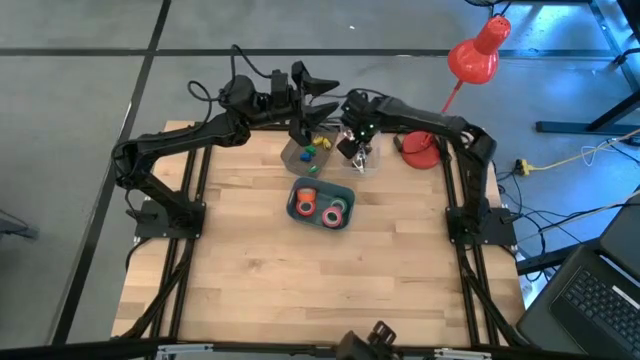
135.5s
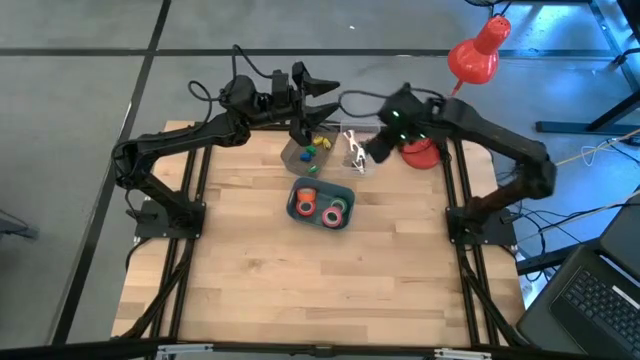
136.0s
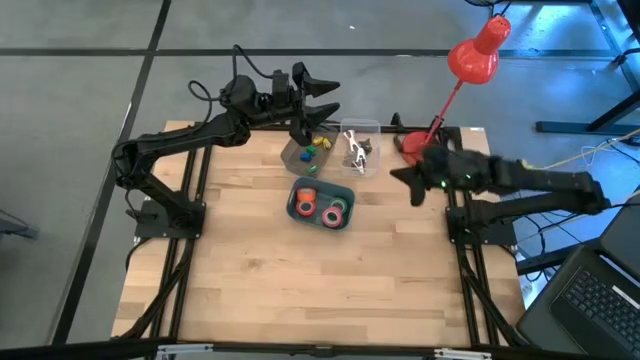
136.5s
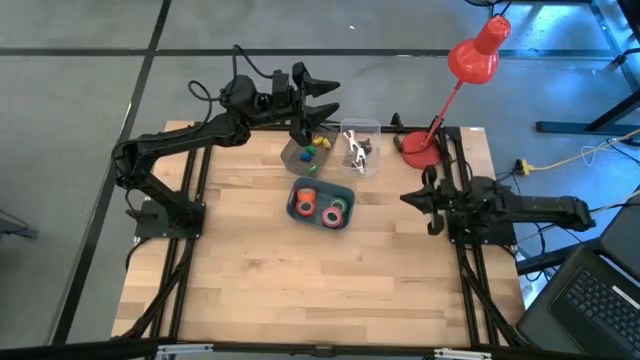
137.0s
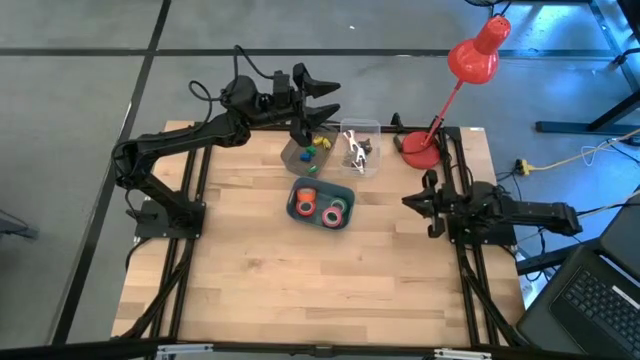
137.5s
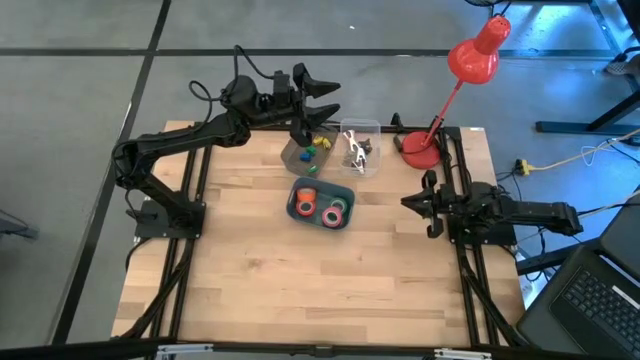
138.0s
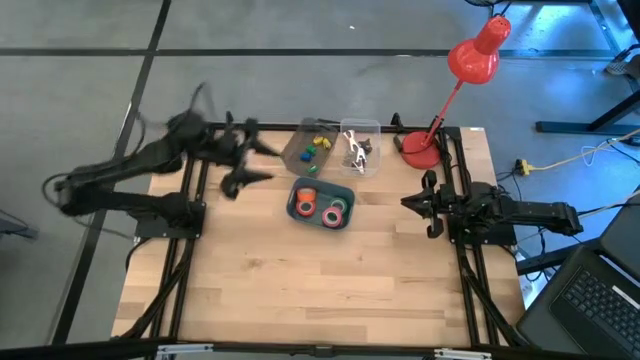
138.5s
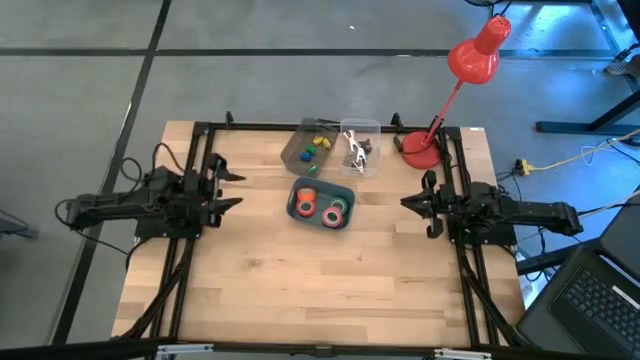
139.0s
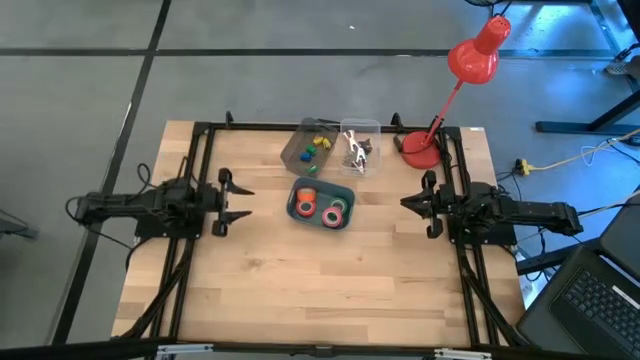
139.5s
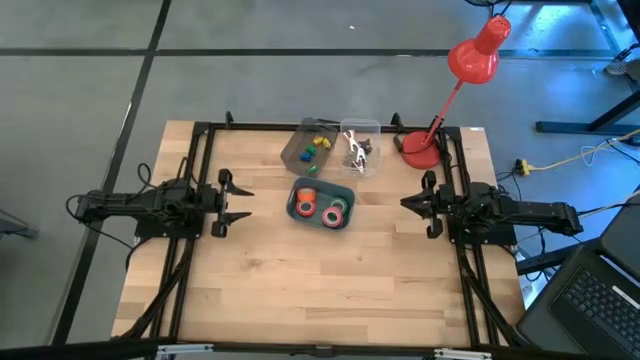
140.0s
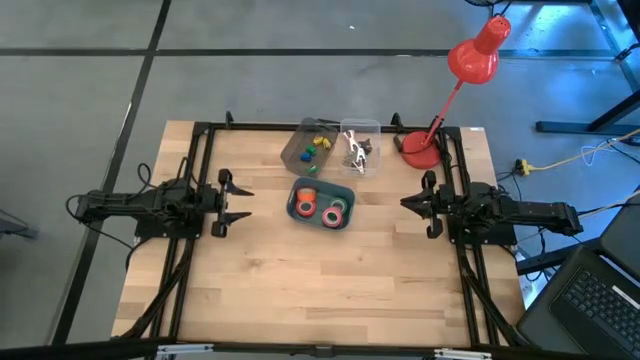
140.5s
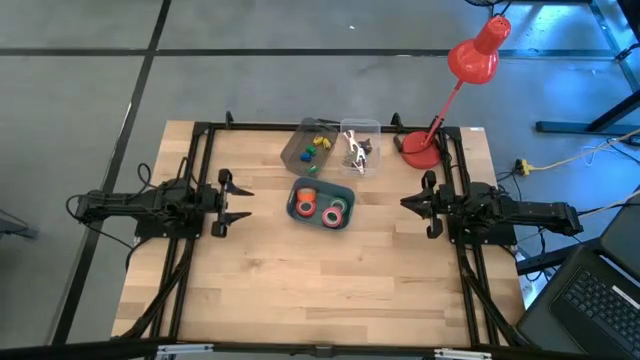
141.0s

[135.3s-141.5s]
Task: Pick and place Stapler, Stapler remover, tape
Return to Home Position

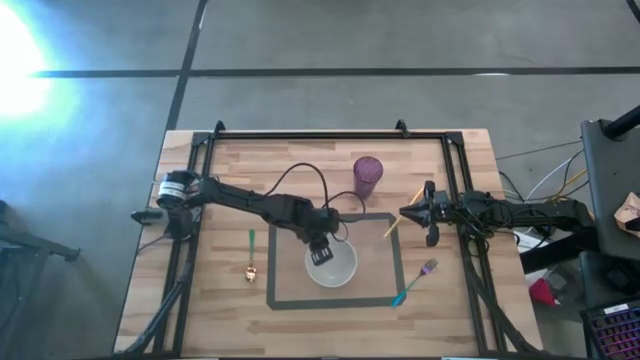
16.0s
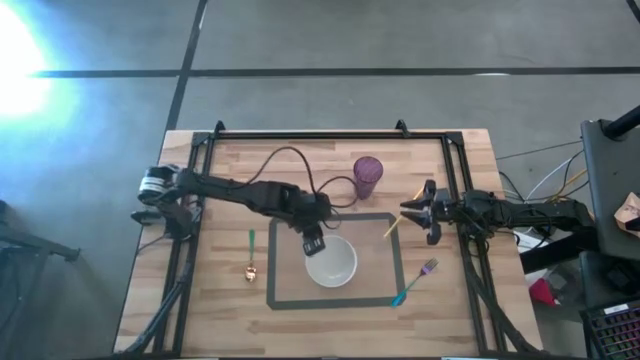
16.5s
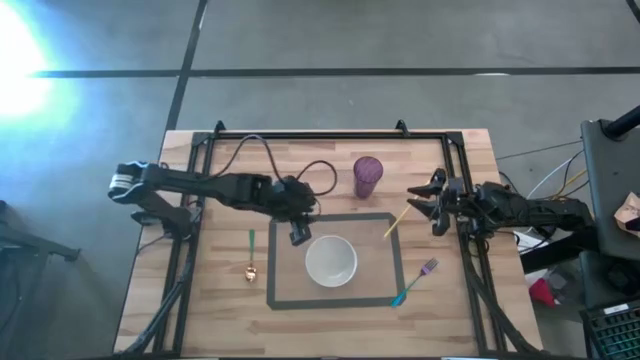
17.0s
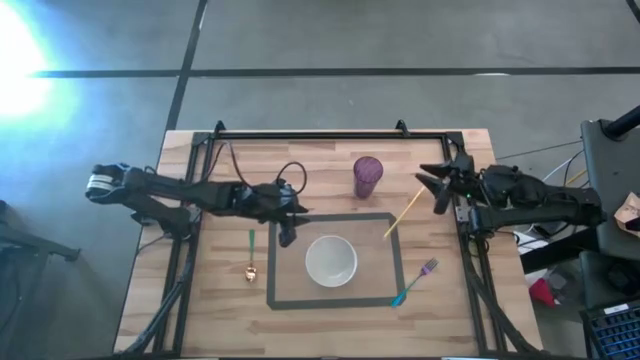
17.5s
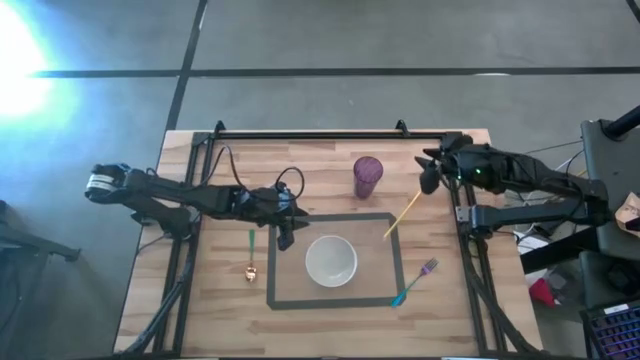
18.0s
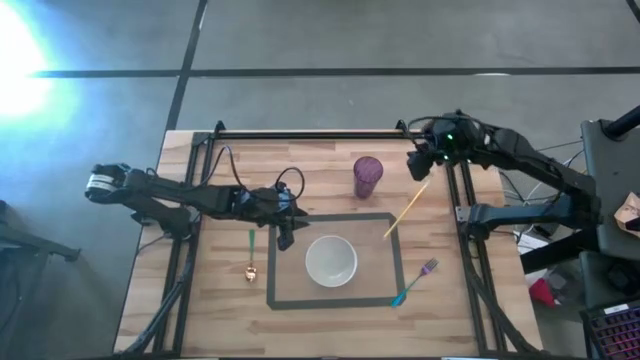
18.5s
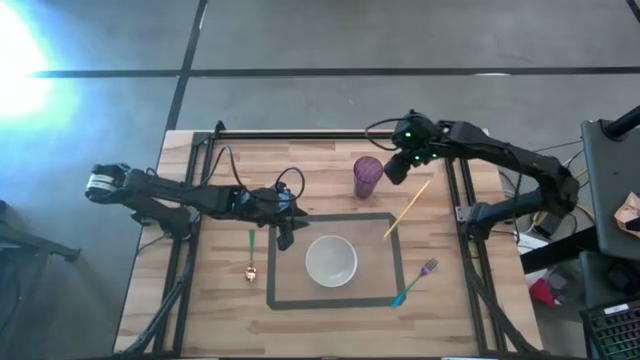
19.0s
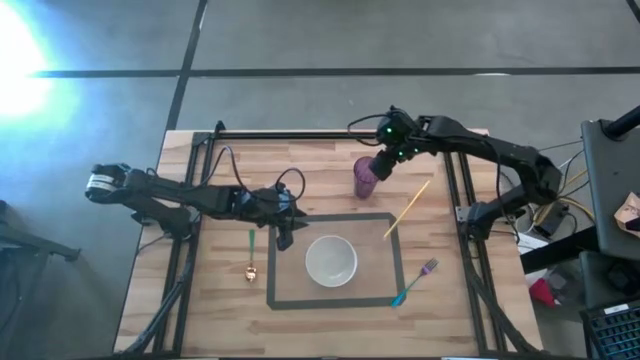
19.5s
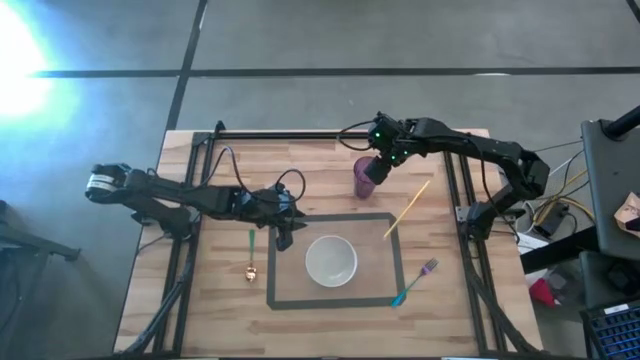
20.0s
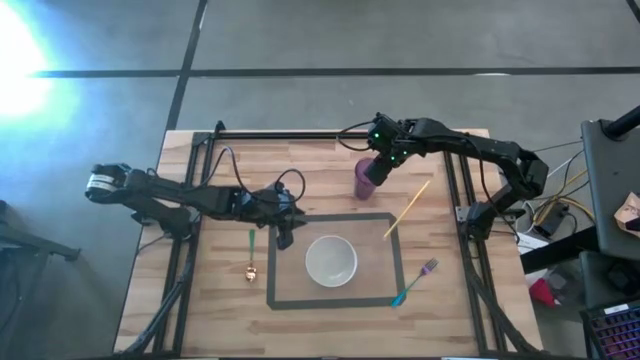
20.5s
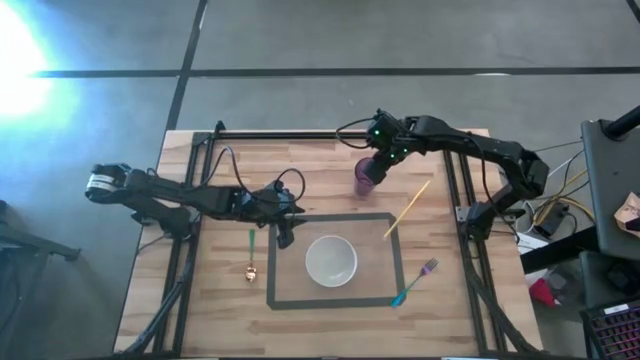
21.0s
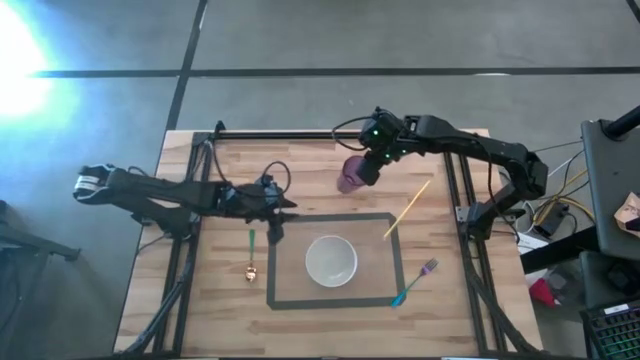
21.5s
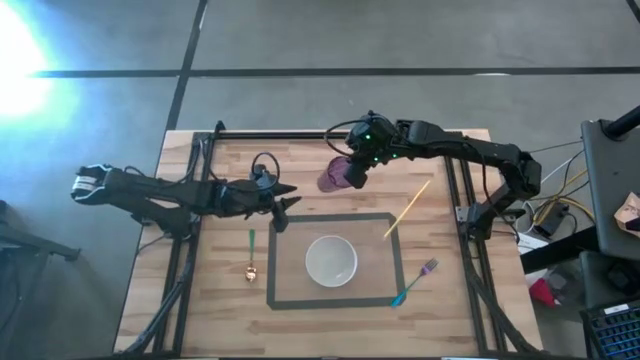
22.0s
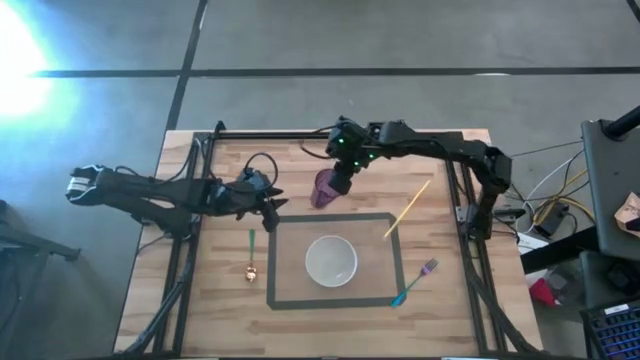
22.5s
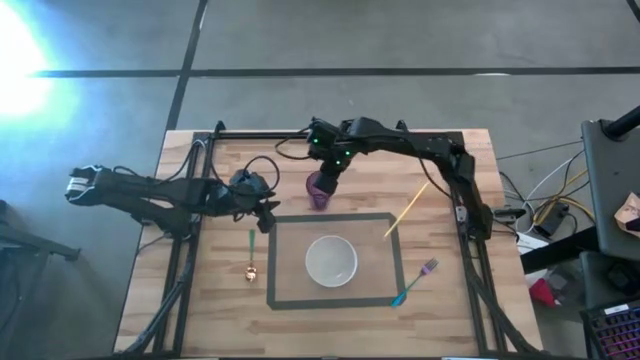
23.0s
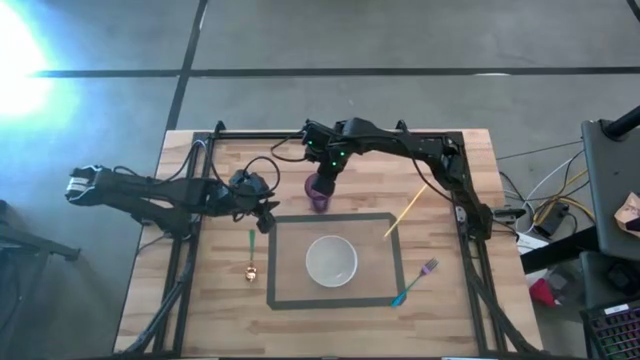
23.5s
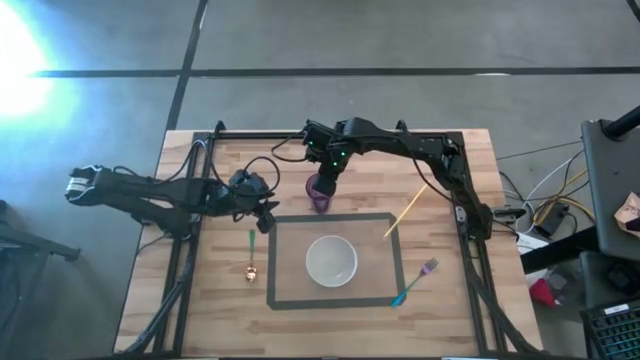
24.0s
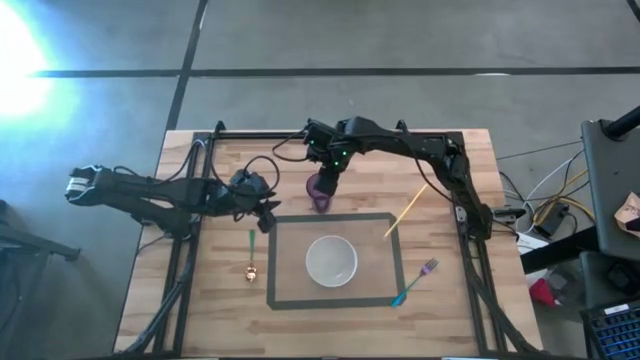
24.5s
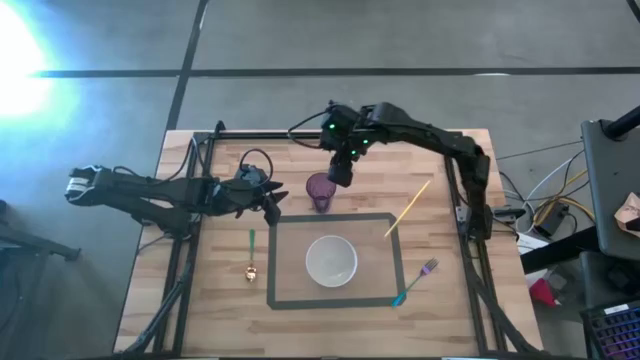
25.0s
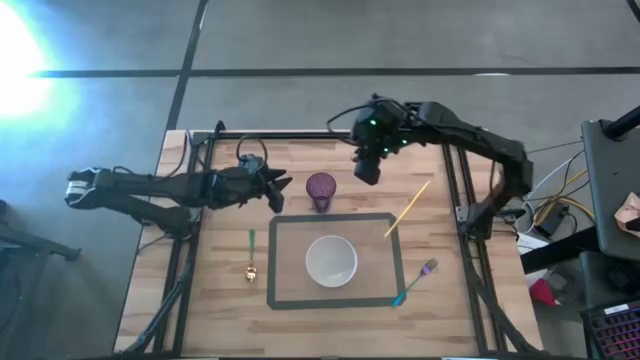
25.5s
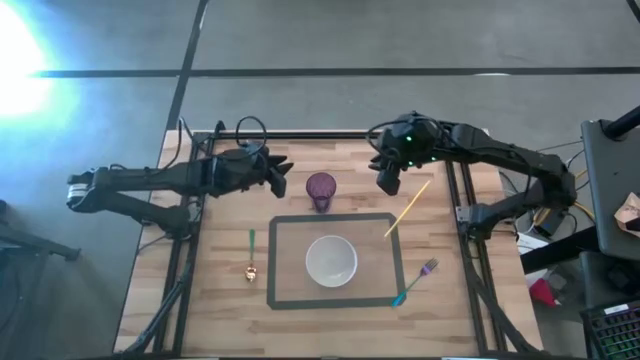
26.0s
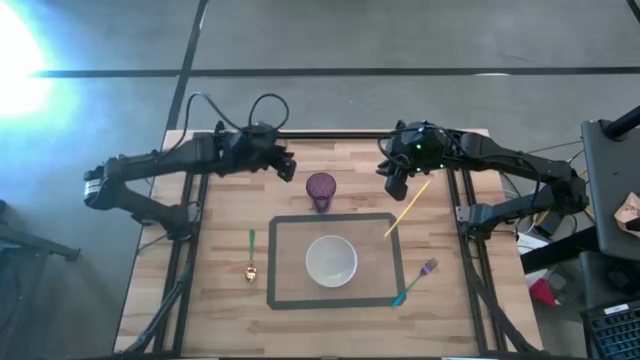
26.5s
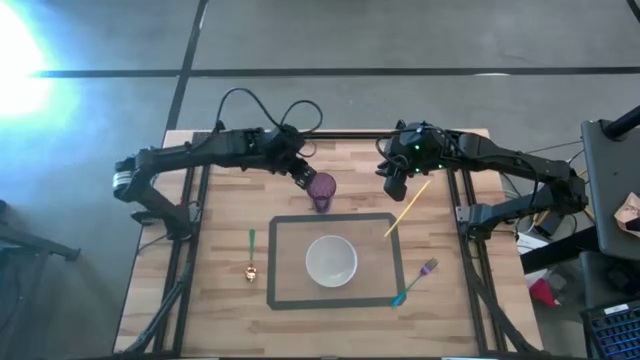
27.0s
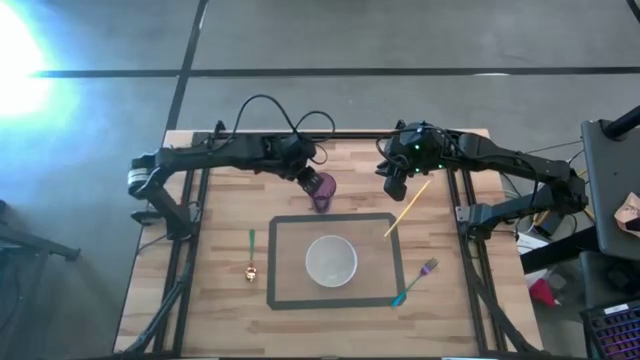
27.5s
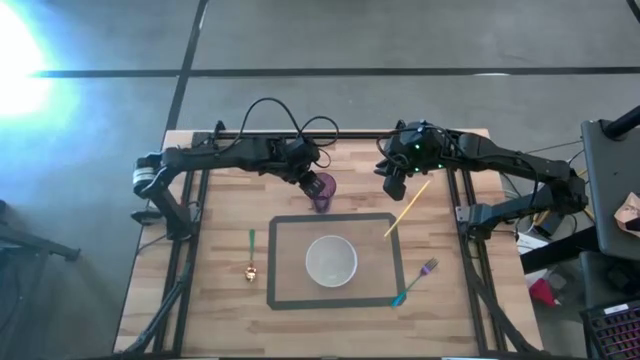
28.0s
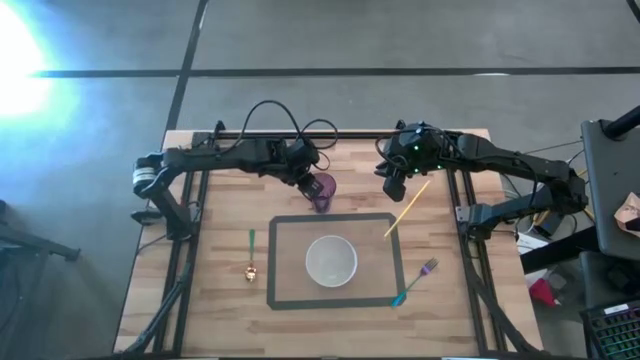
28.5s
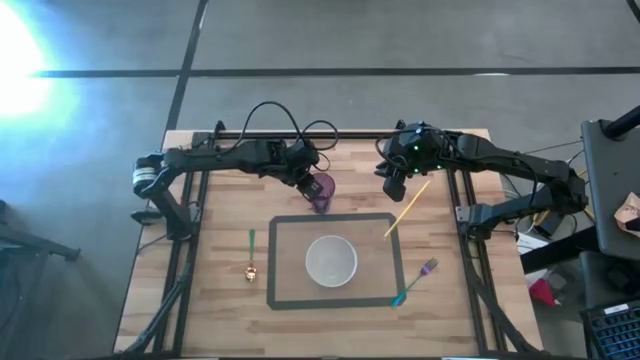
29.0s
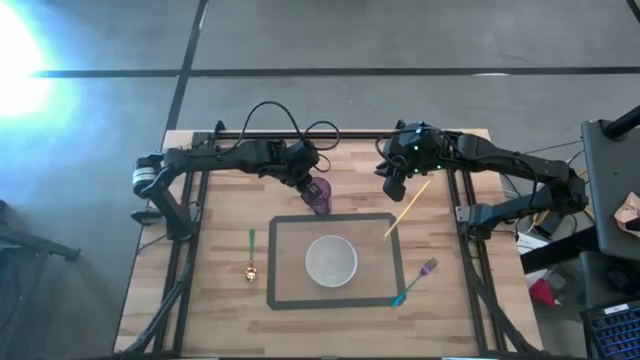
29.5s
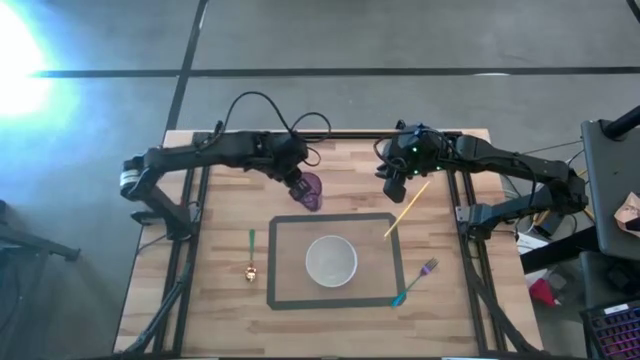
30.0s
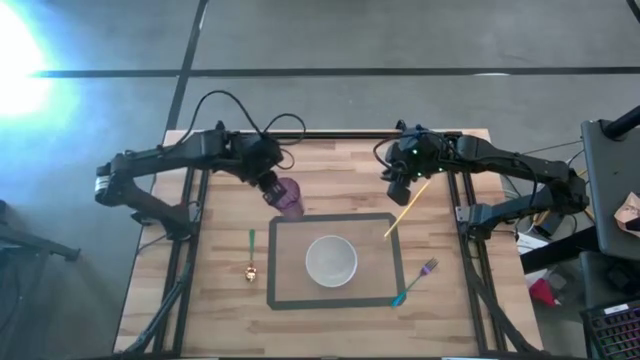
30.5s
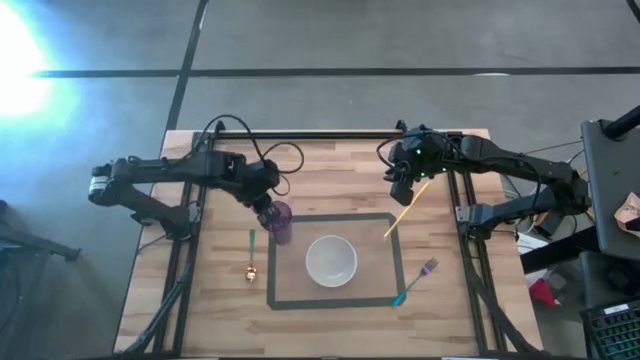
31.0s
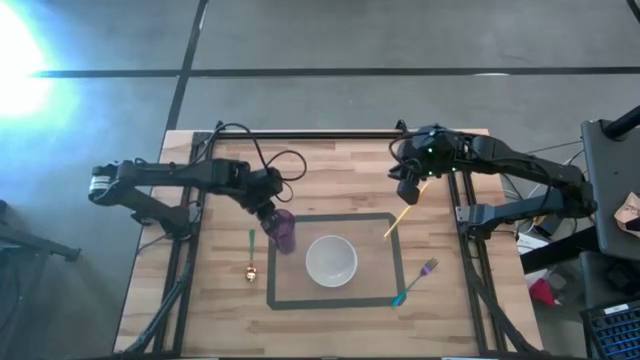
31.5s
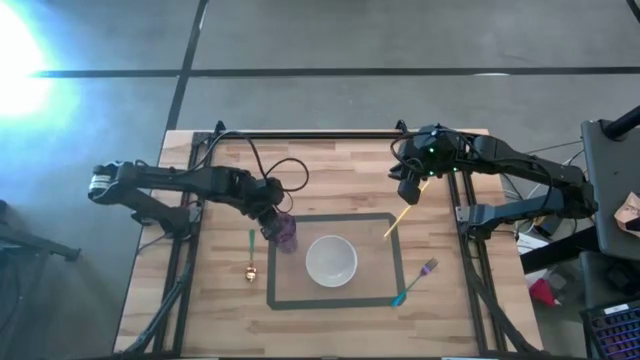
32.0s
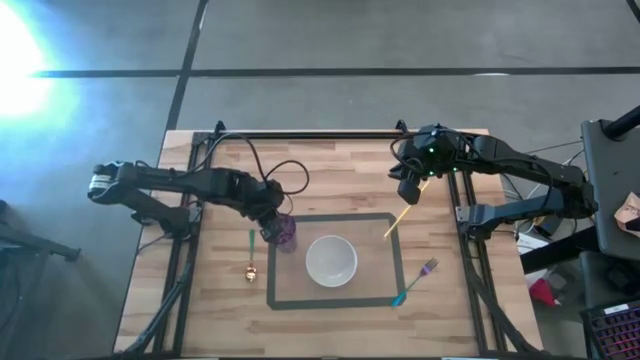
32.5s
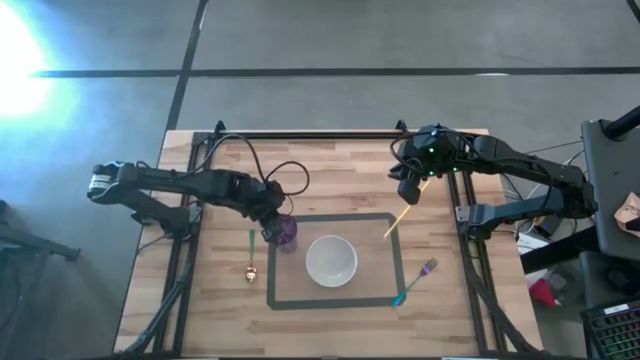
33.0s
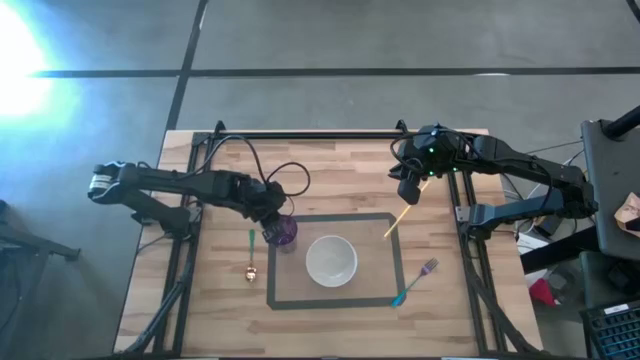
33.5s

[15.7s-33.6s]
Task: Pick & Place Utensil
Put the purple cup on the mat to the top left of the white bowl
